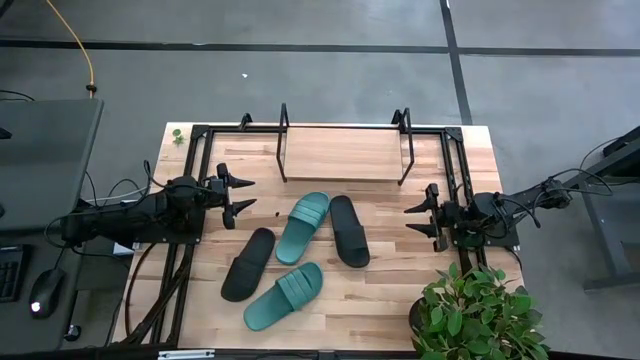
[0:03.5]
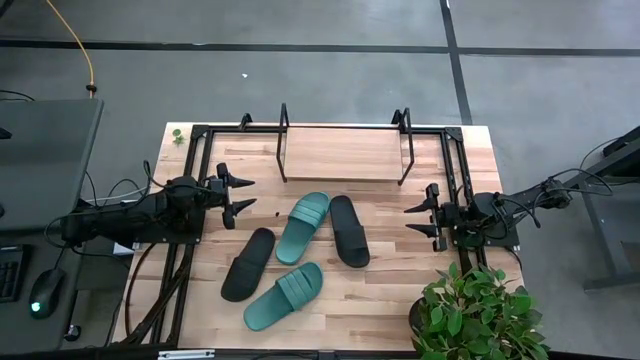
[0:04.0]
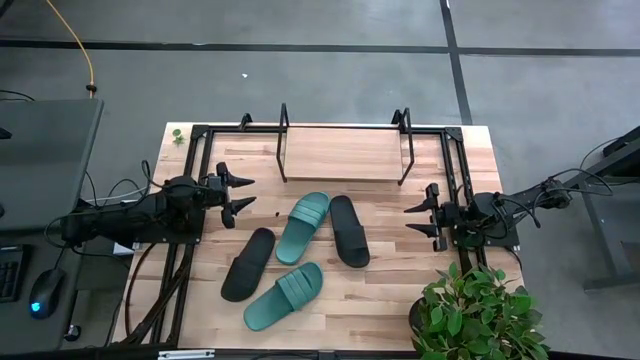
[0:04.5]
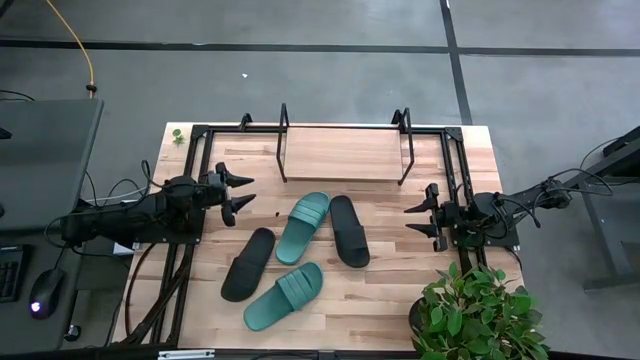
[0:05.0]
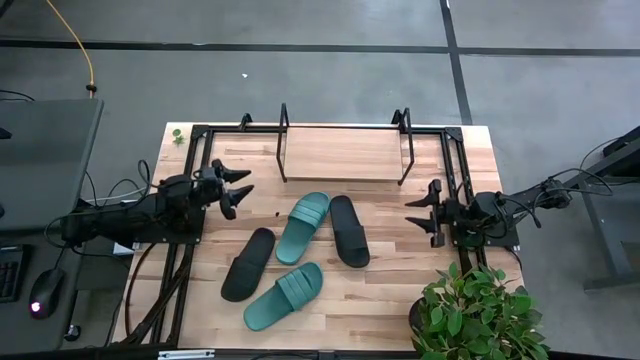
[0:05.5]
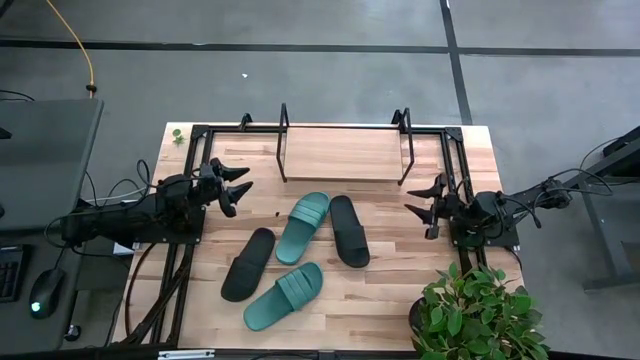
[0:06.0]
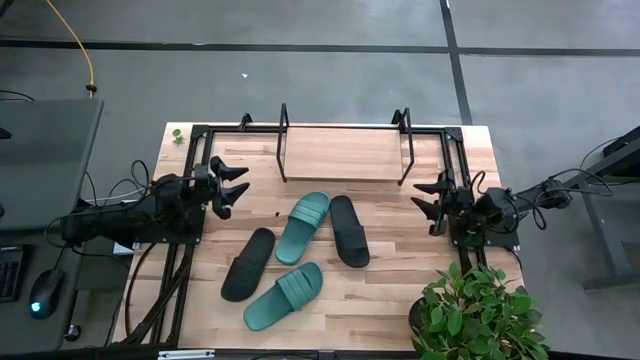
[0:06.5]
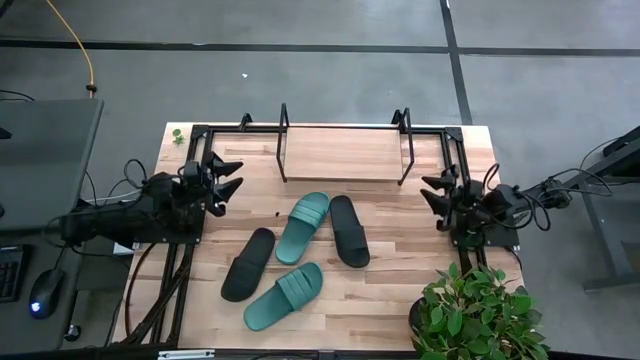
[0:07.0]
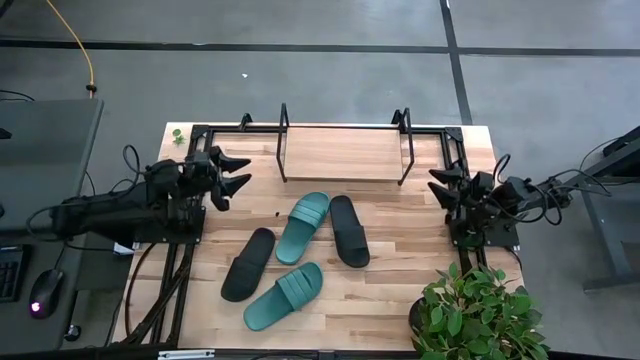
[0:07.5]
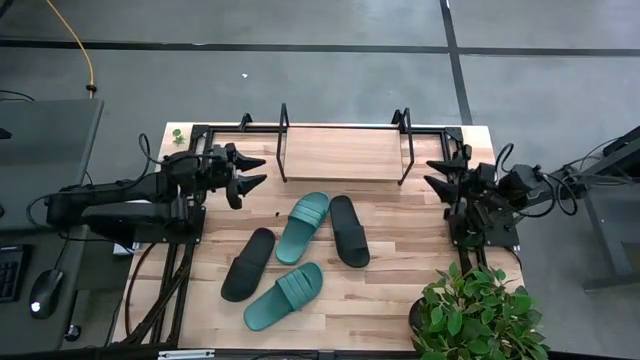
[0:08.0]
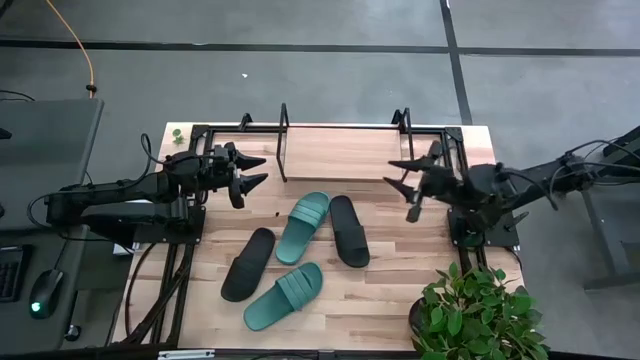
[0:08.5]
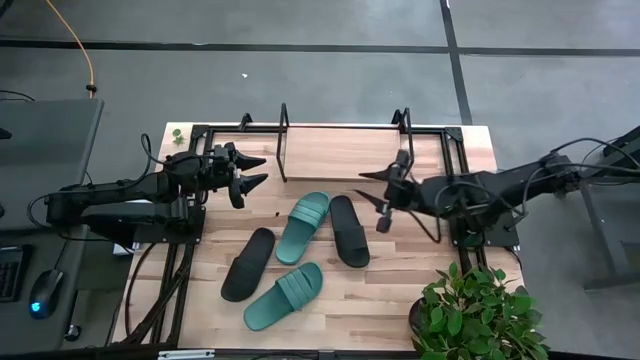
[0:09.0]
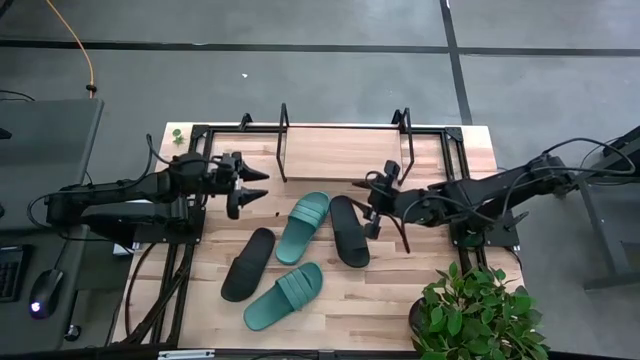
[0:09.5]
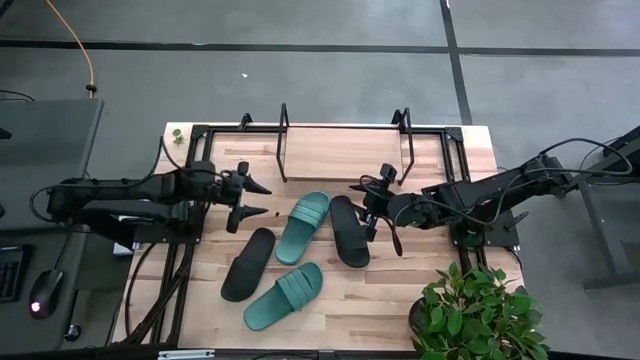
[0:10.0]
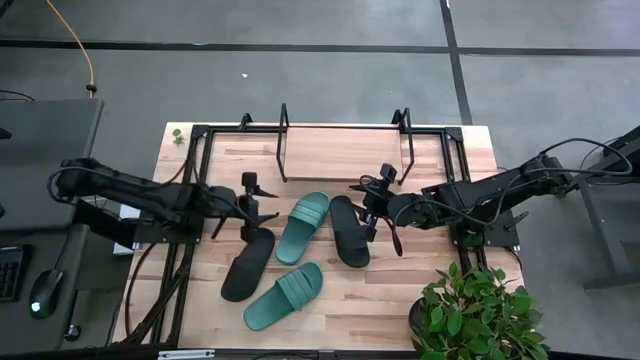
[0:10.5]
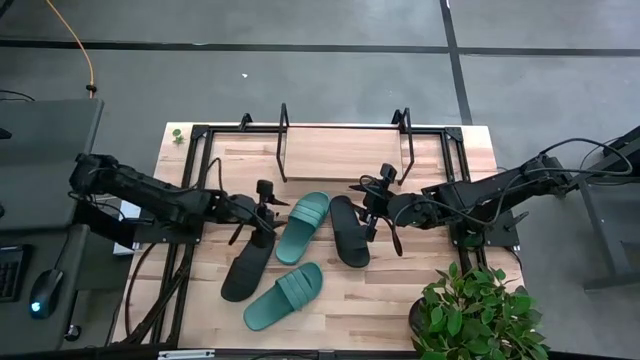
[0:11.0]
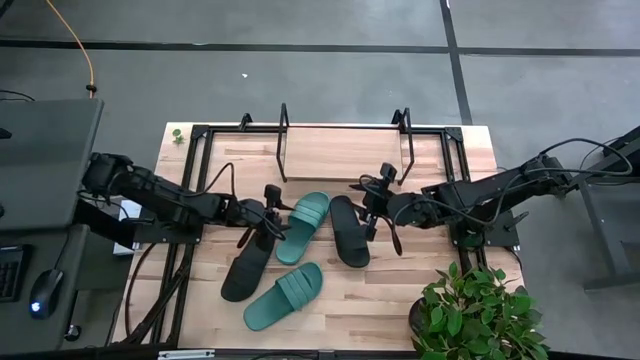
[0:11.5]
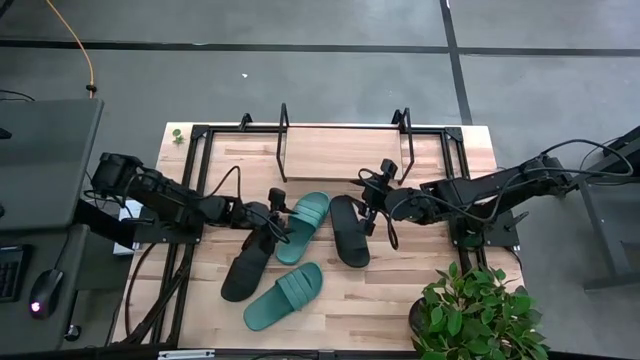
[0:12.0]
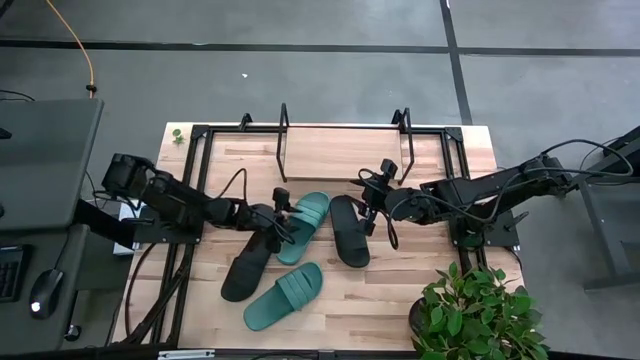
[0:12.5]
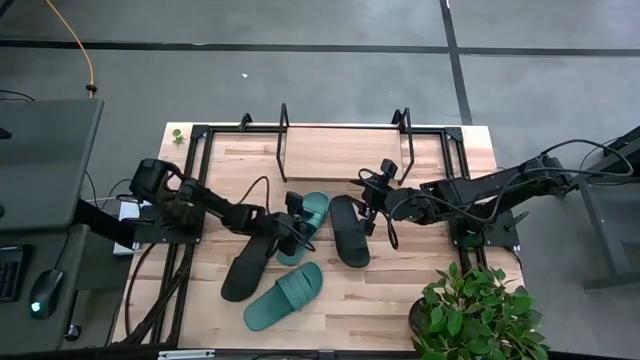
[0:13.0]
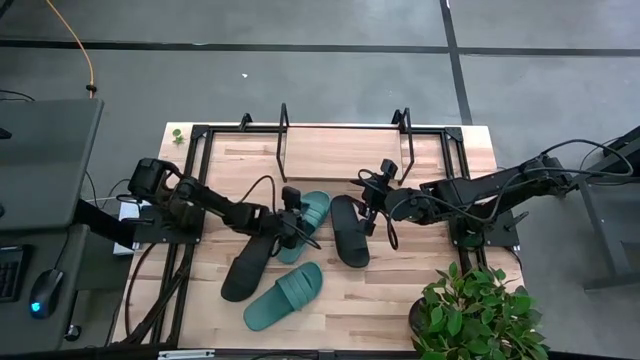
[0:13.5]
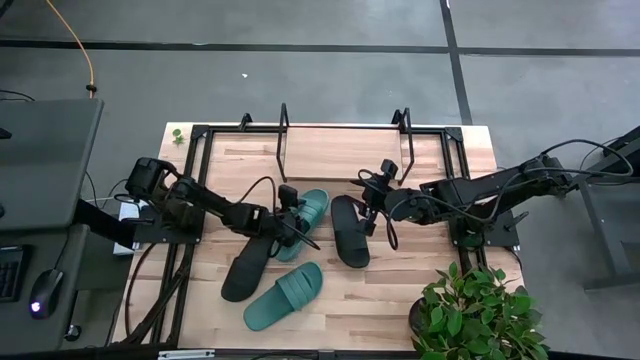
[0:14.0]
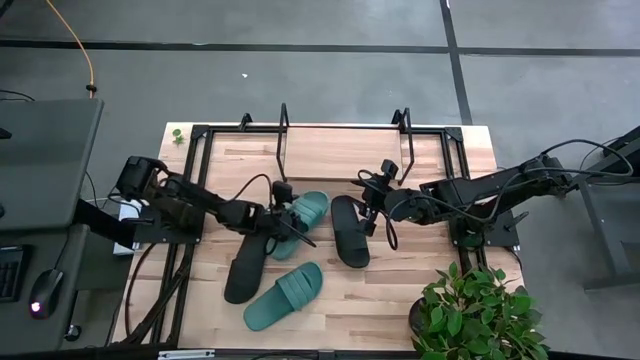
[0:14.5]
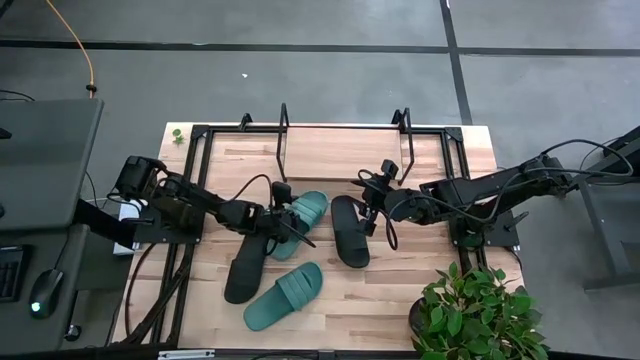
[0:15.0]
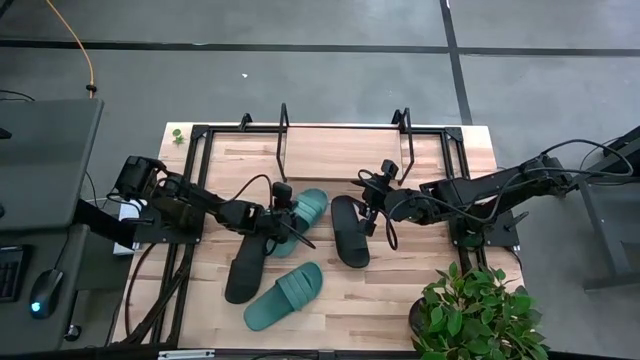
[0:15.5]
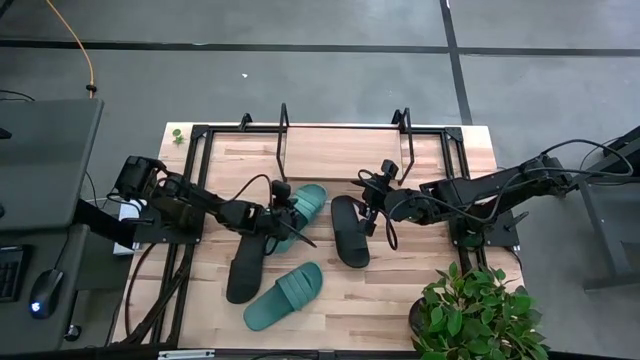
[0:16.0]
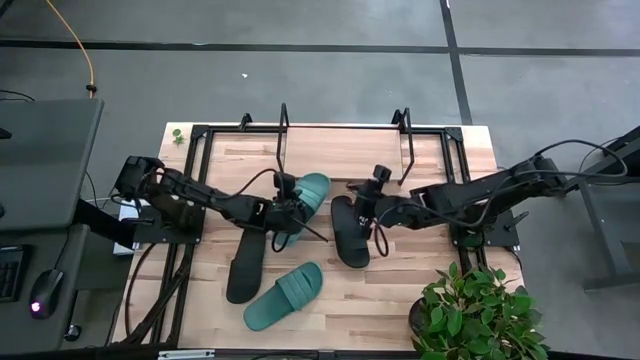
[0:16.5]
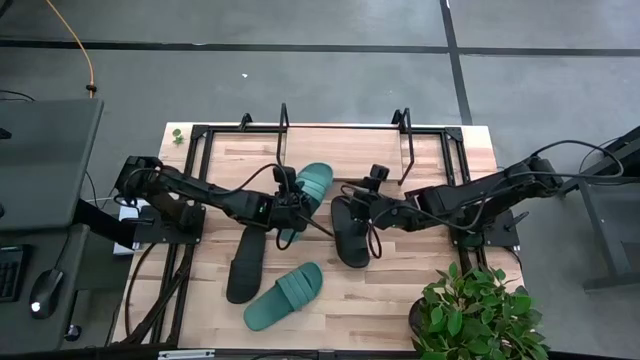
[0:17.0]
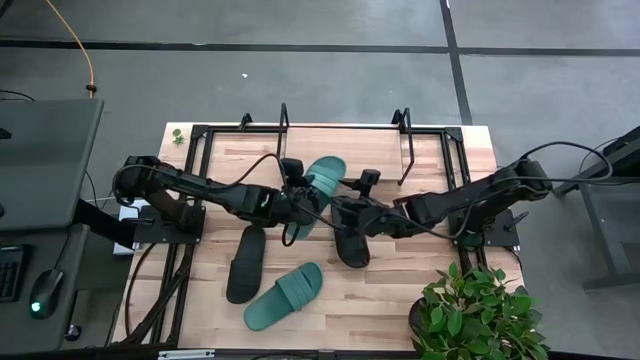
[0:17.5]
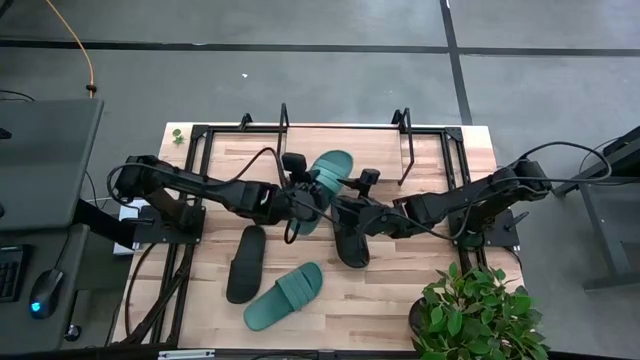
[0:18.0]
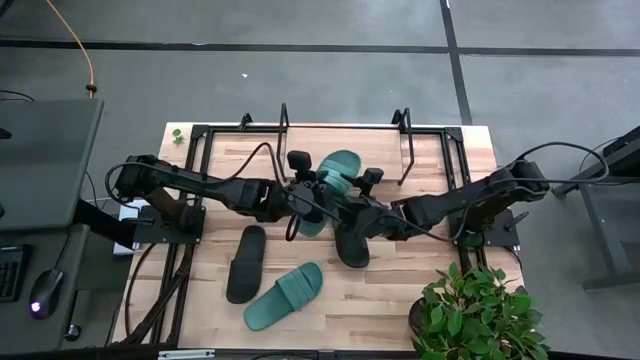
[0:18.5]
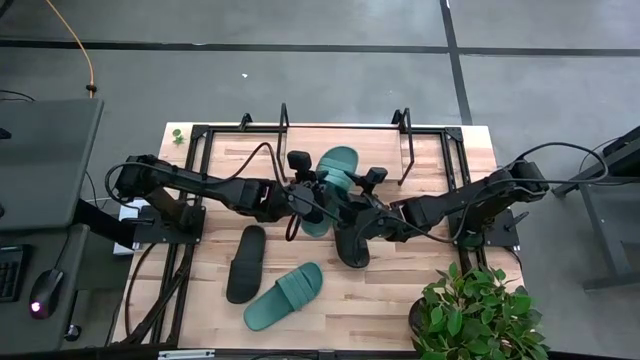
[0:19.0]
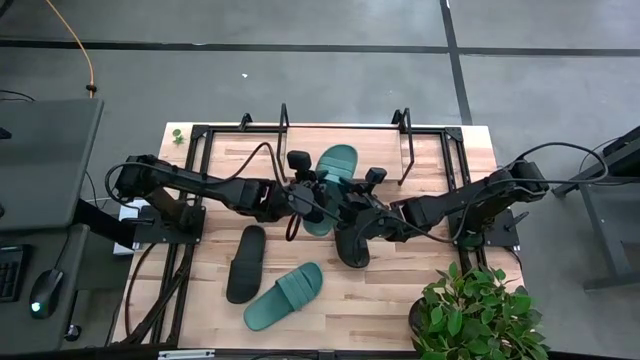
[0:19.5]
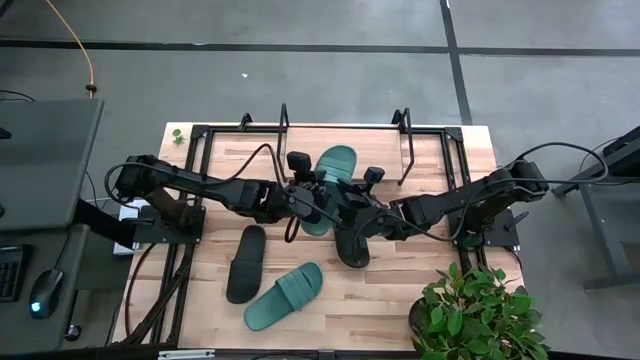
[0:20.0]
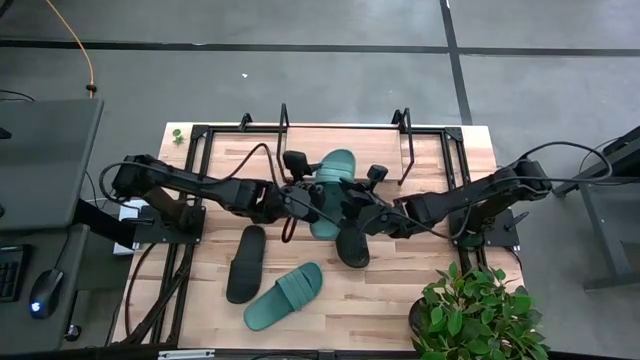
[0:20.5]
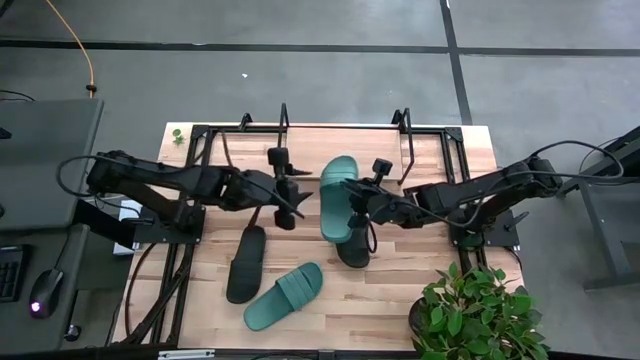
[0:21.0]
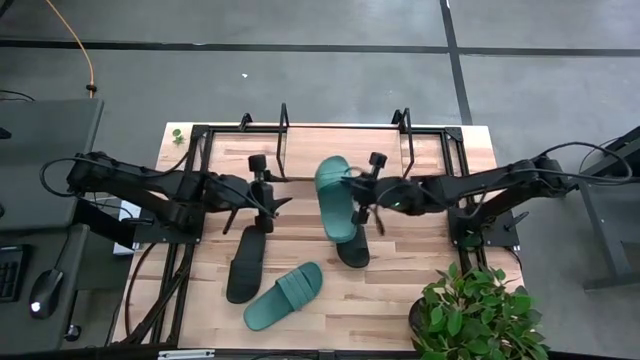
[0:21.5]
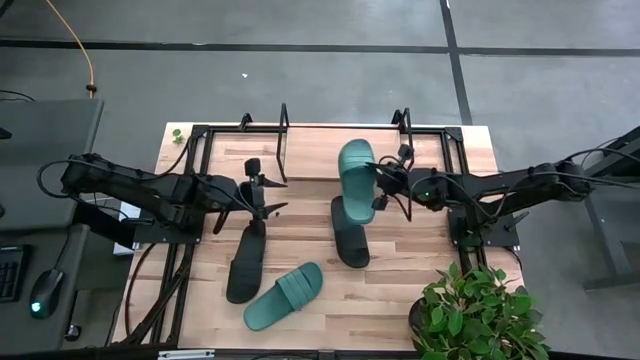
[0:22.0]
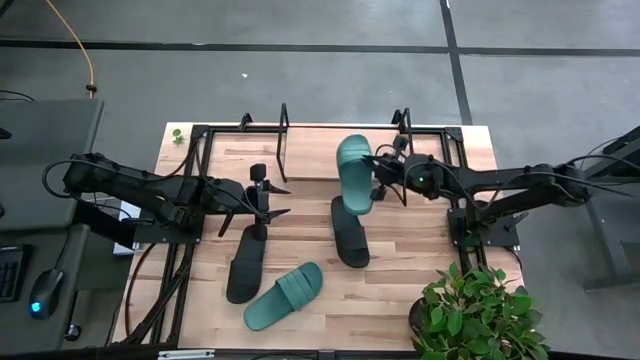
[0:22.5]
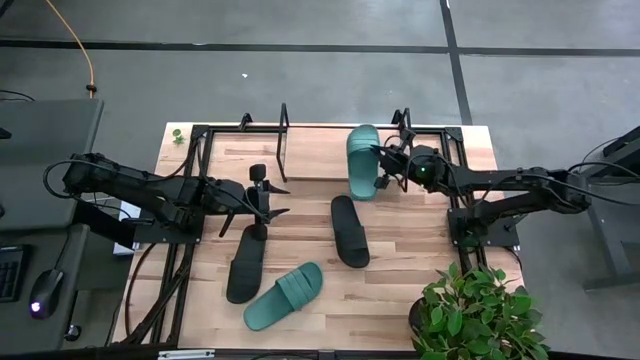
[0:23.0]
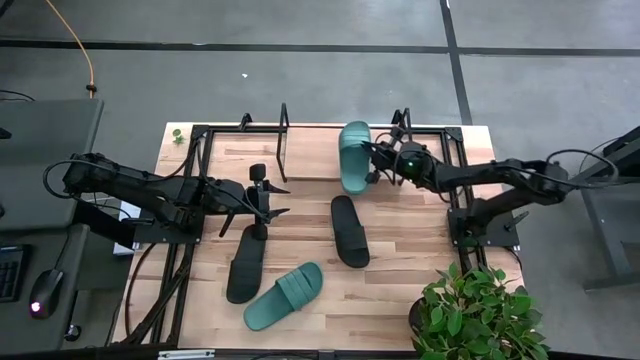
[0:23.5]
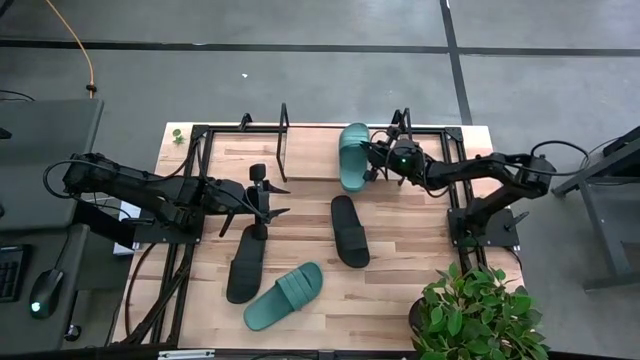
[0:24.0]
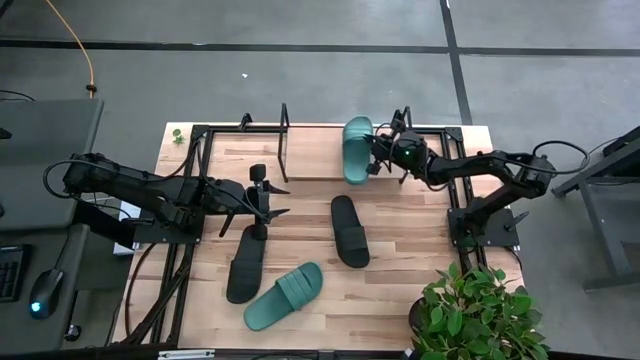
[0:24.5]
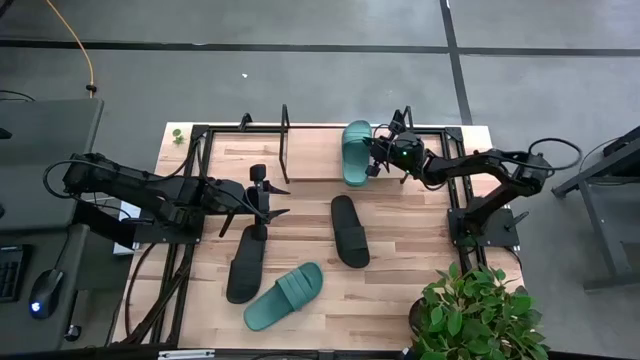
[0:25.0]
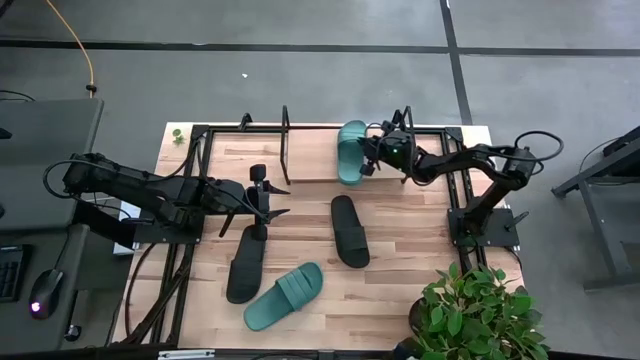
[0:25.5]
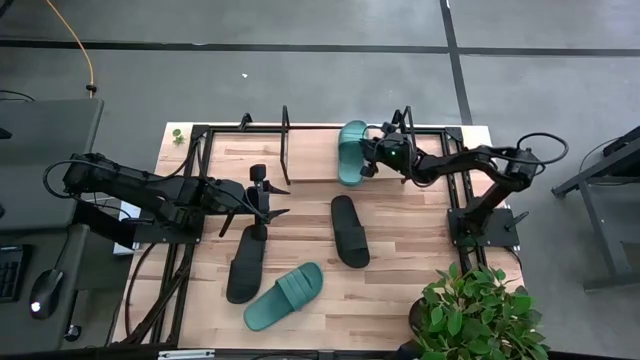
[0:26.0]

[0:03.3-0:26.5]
Task: Pick and place slides into the shelf
Put the top green slide on the shelf
